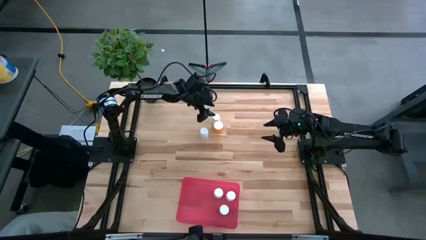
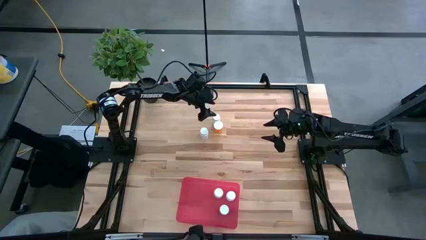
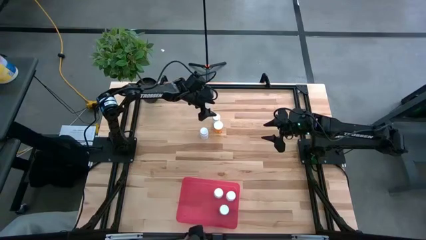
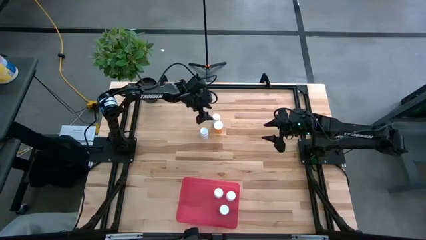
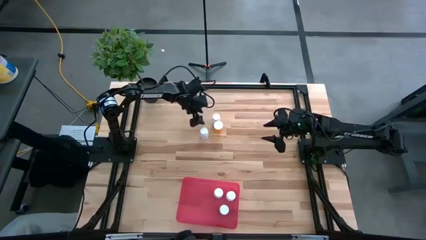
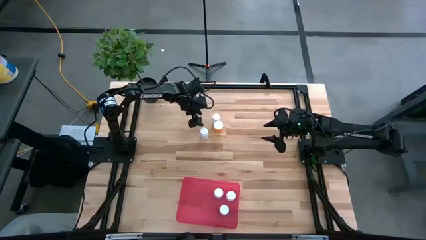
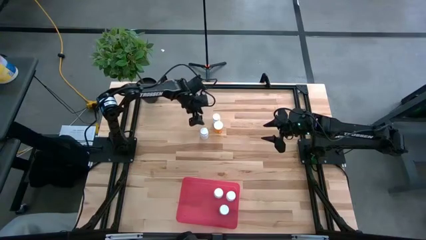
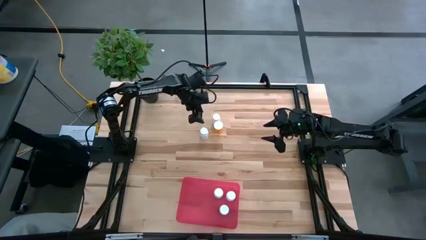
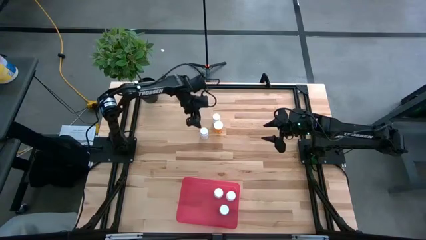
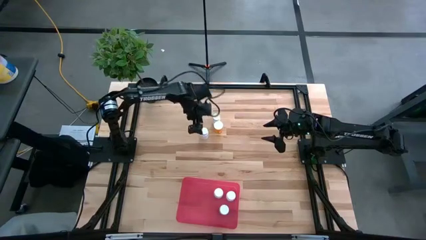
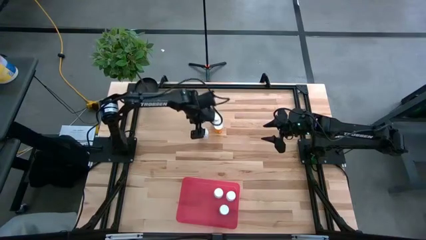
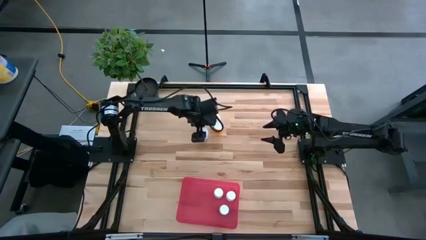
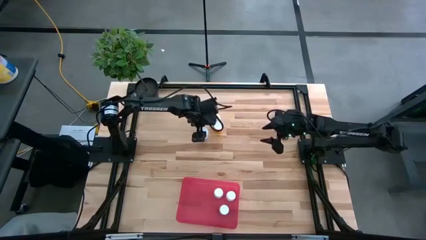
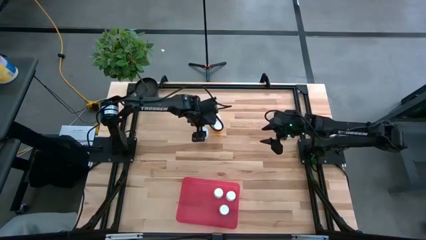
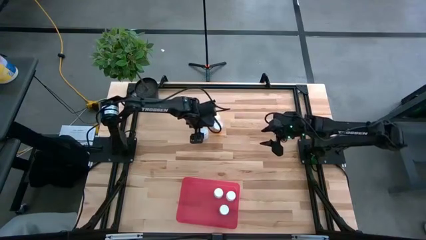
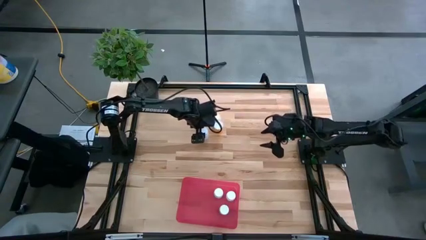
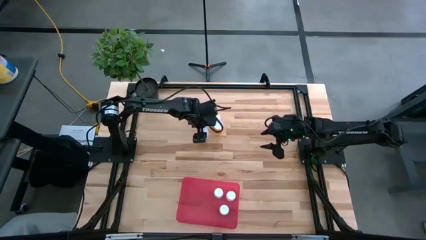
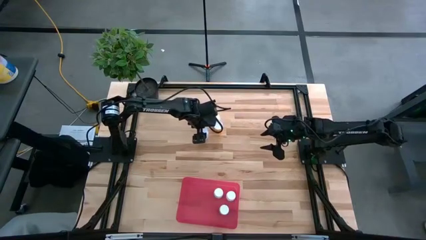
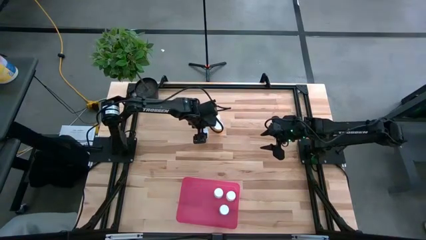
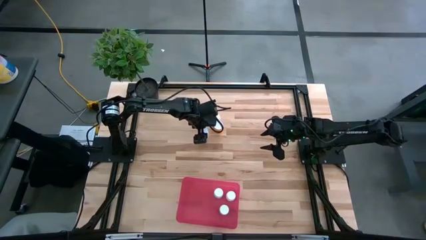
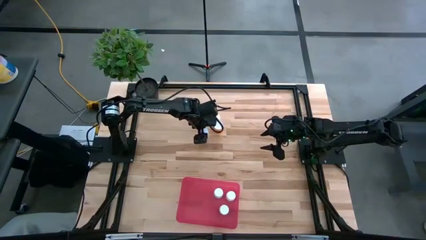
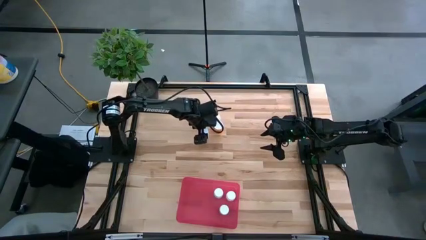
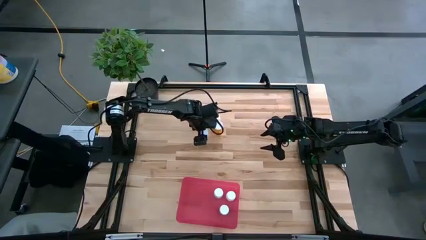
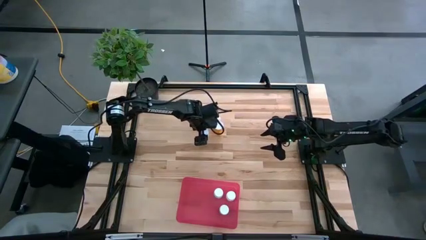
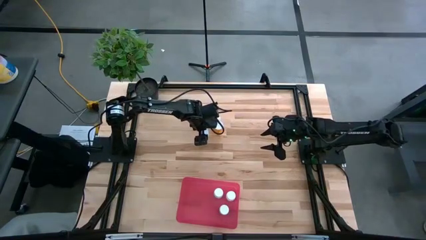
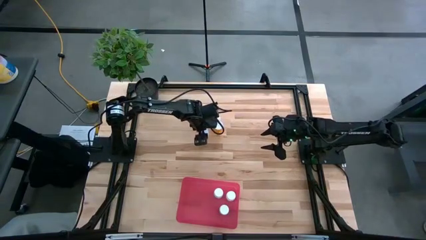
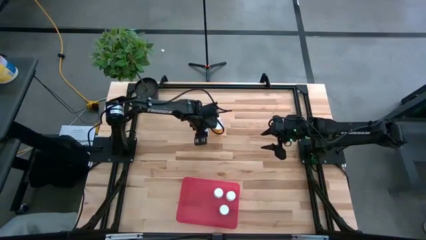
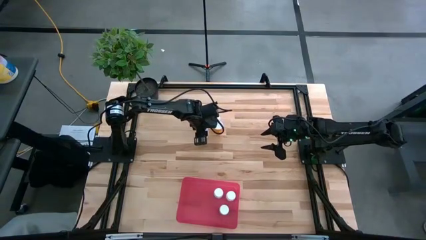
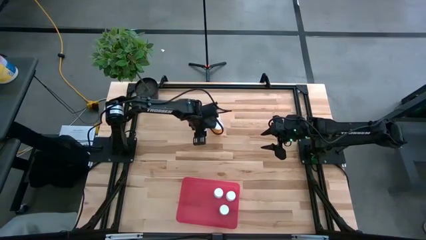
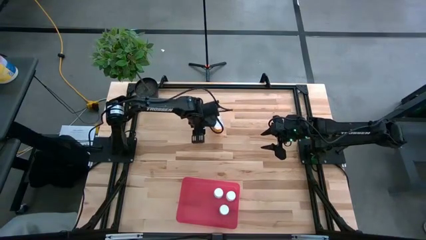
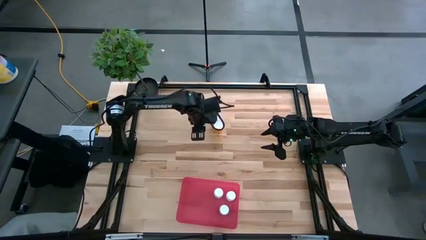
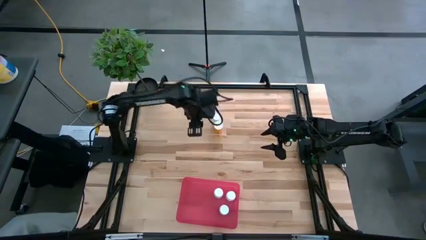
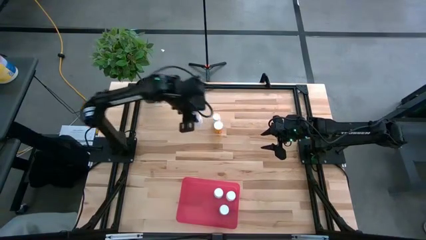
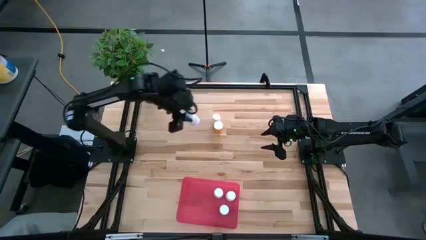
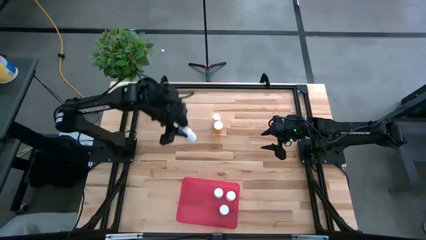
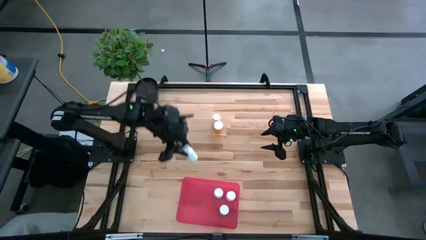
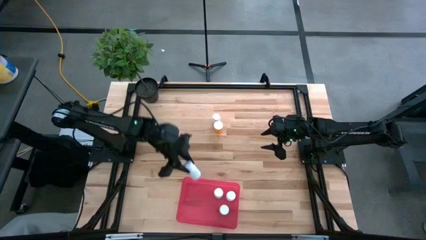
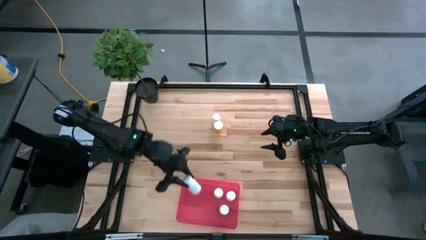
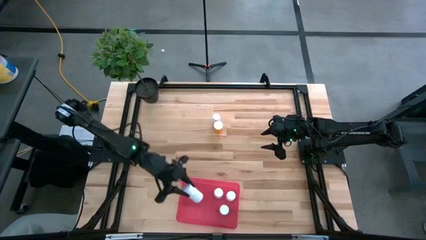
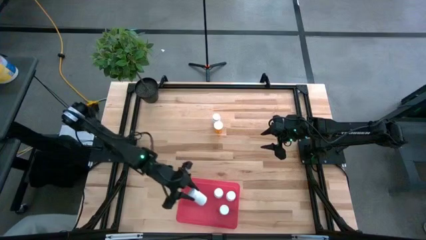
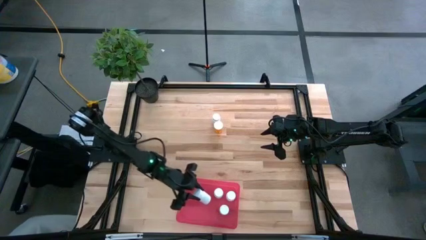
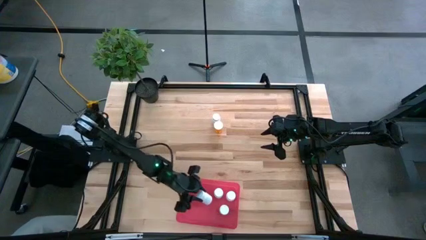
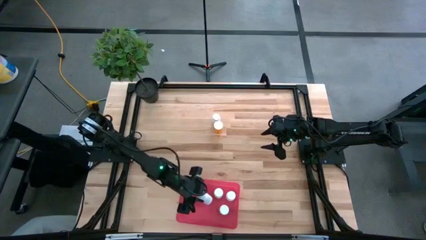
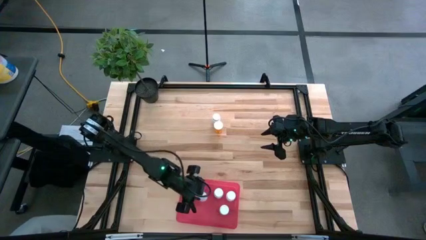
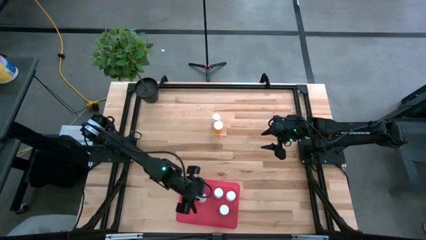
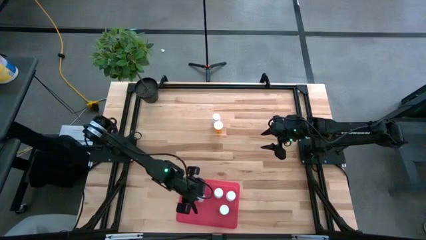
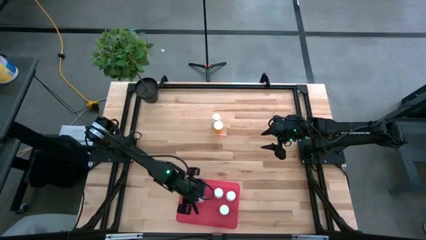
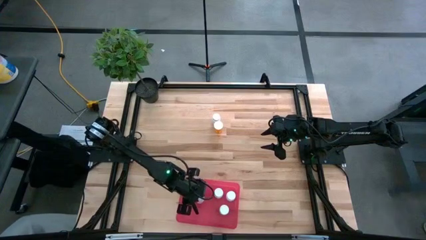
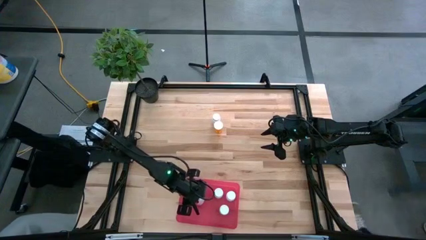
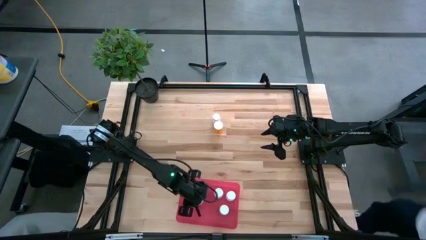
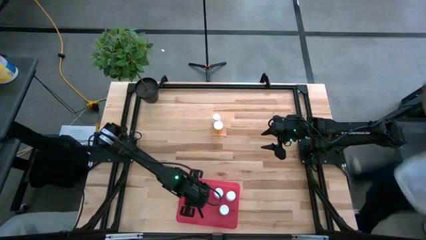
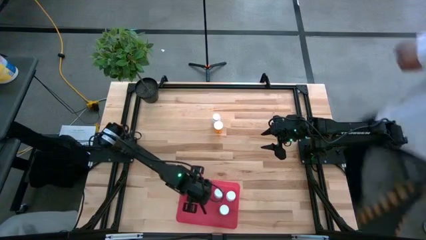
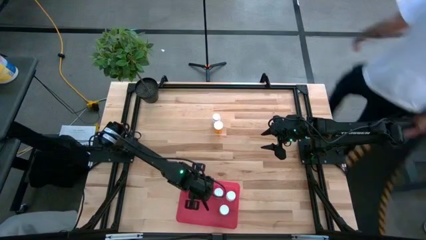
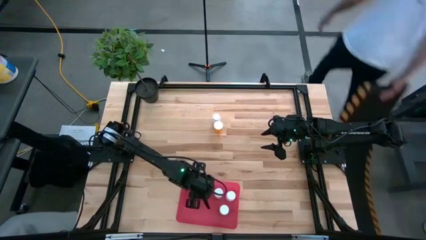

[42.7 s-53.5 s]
Task: Pick and place pill bottles into a basket
Put the white pill bottle into the red bin

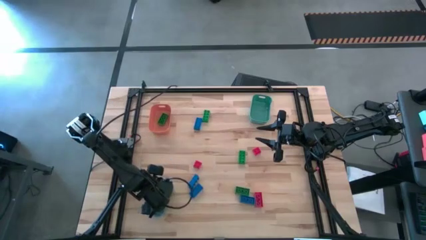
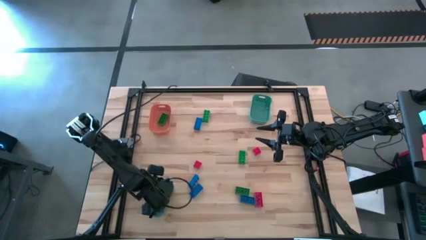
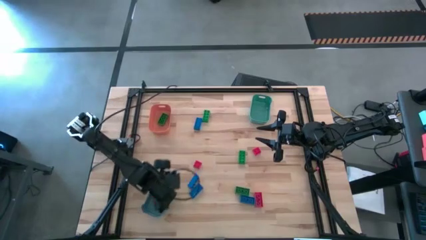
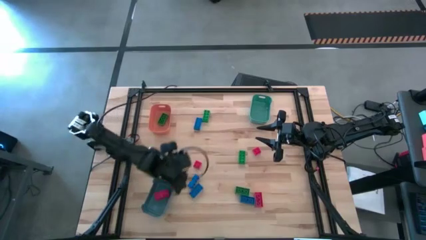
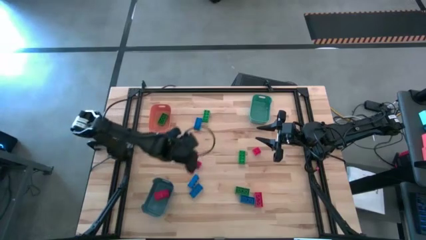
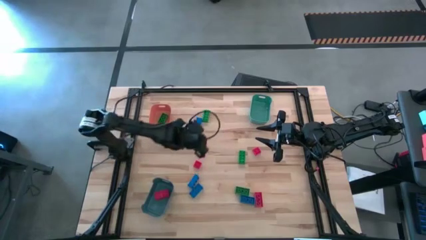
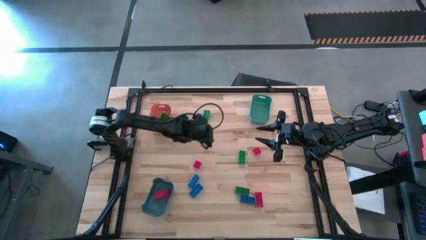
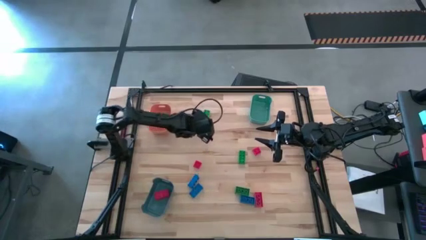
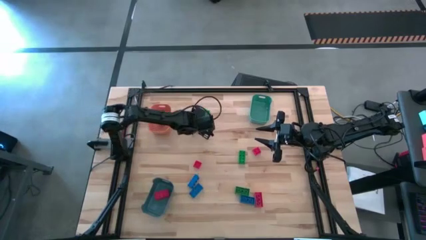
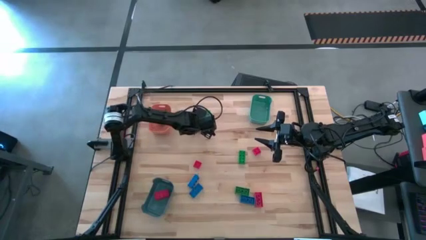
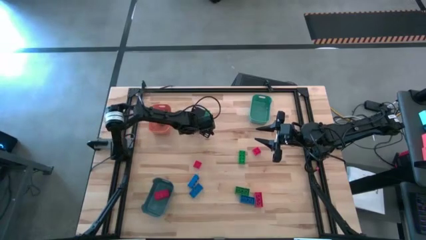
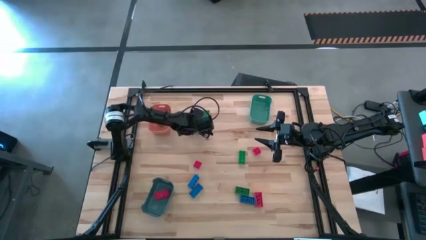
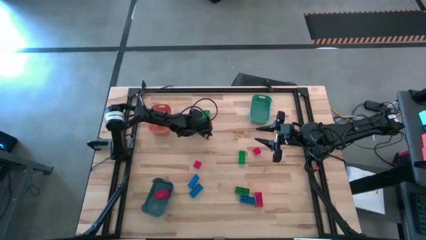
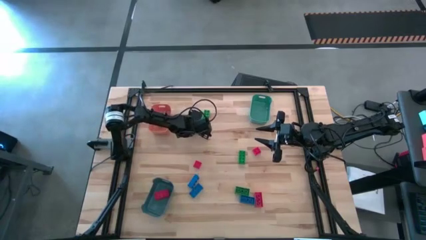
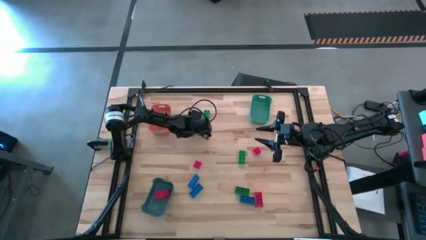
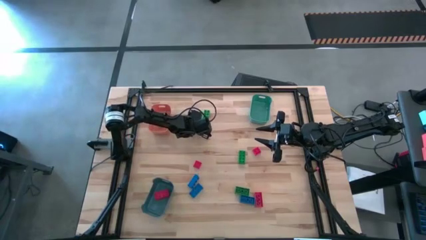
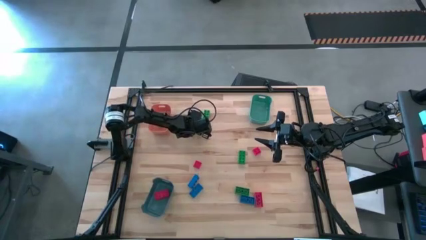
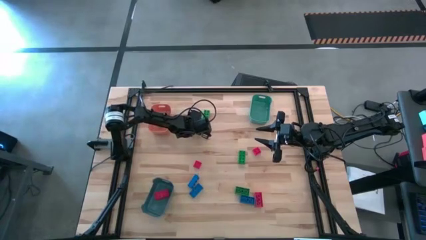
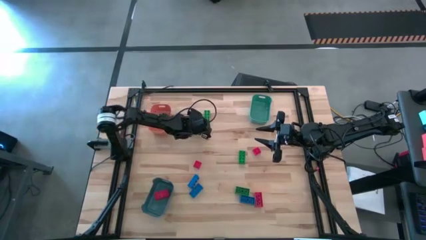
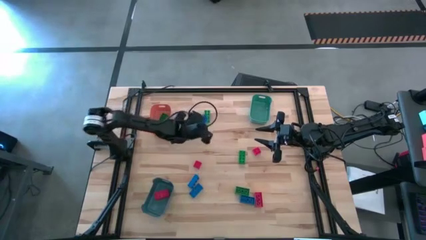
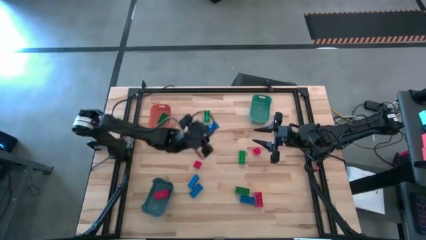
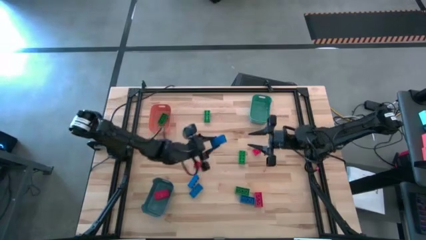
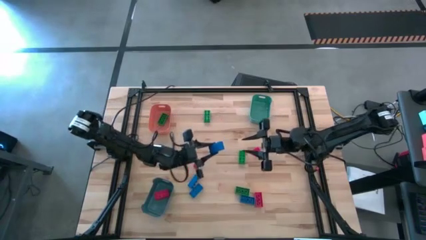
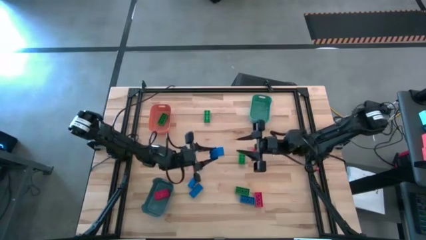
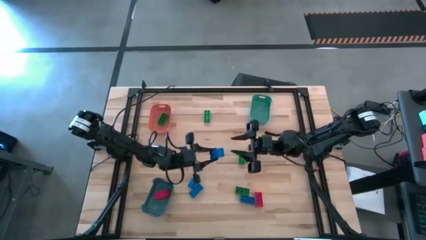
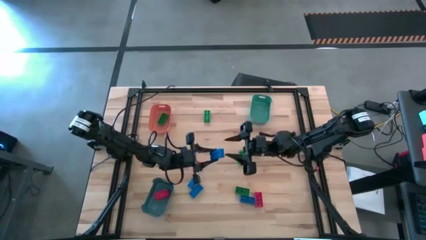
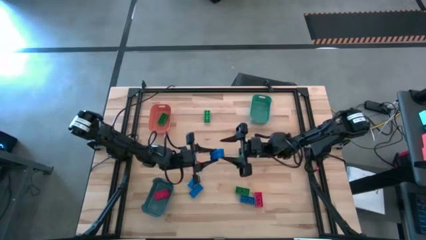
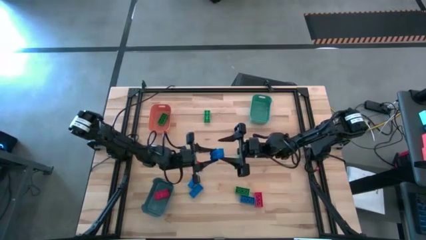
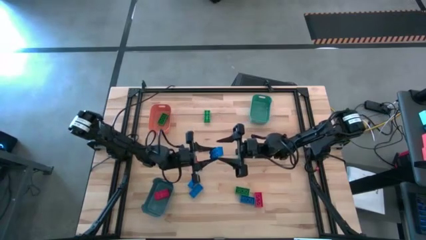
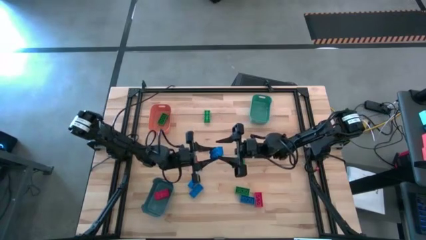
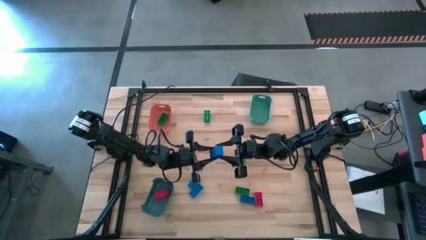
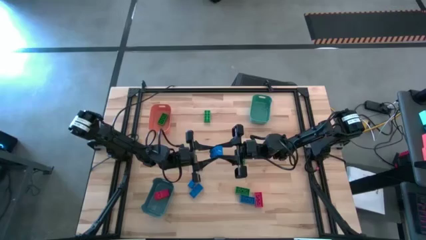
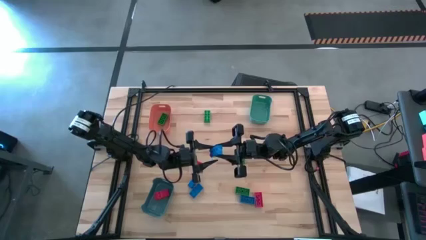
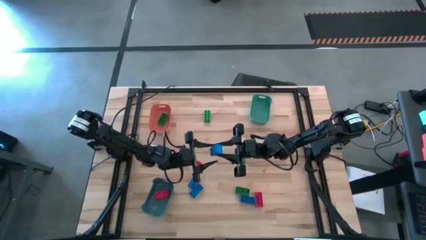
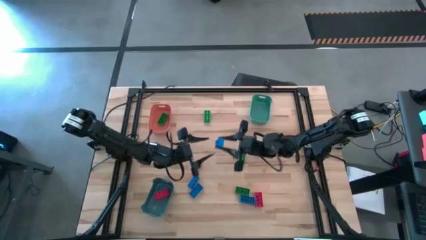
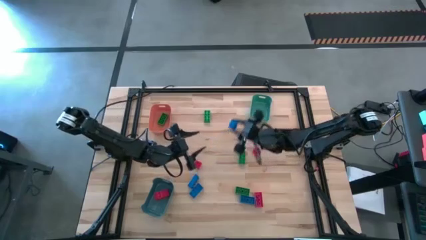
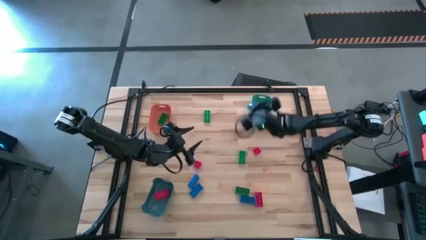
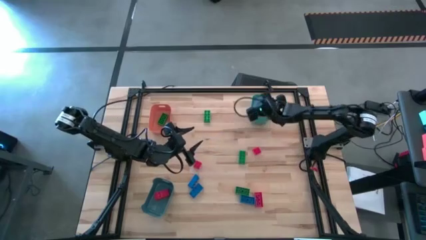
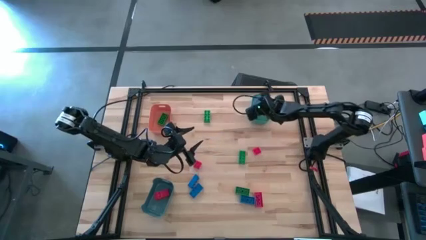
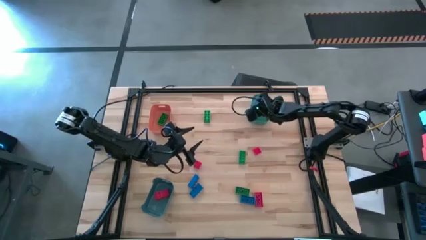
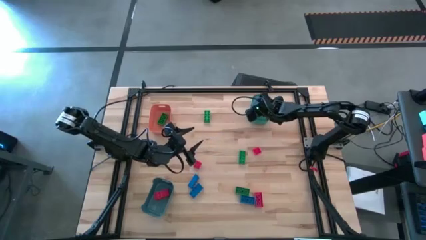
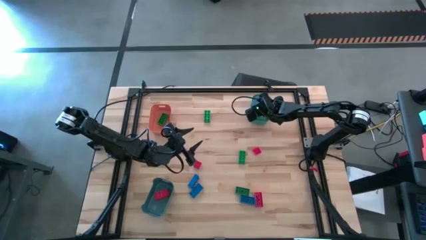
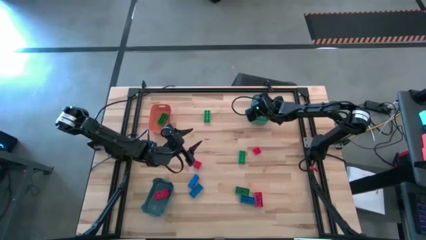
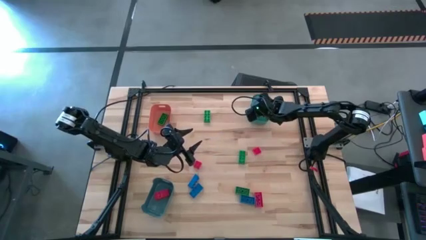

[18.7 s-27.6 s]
Task: Sort & place blocks by color
Put the blue game piece into the green bin
